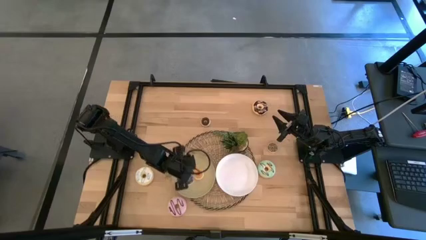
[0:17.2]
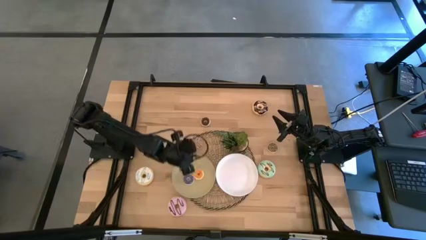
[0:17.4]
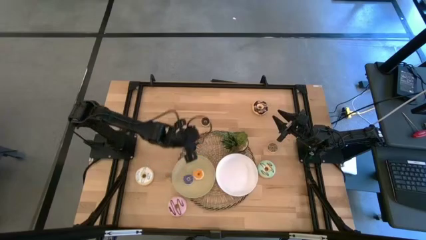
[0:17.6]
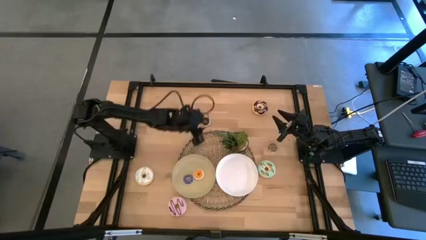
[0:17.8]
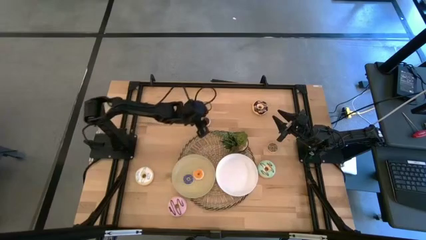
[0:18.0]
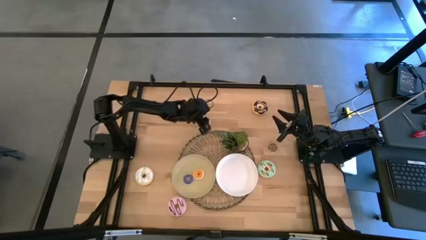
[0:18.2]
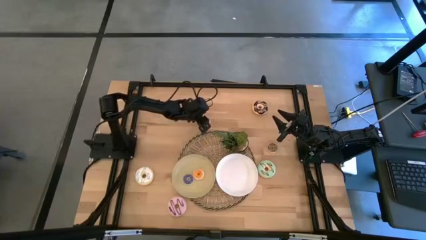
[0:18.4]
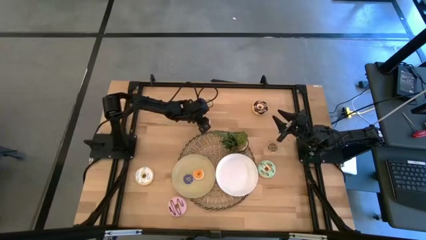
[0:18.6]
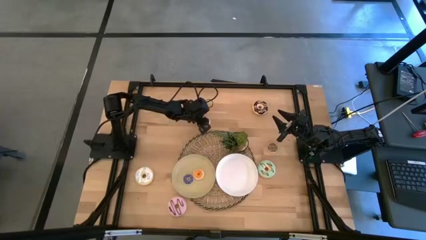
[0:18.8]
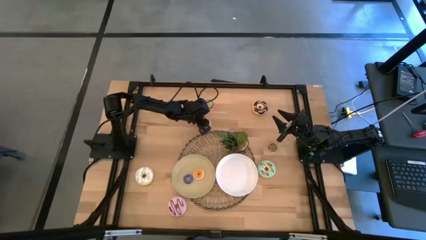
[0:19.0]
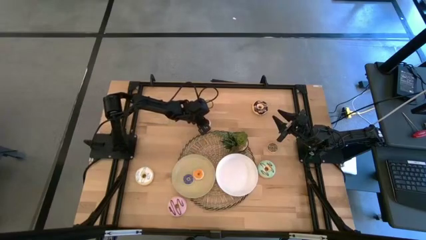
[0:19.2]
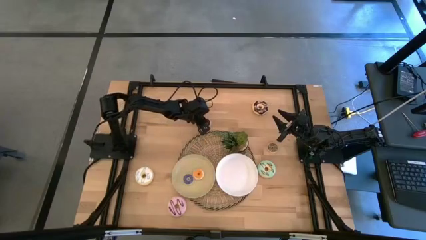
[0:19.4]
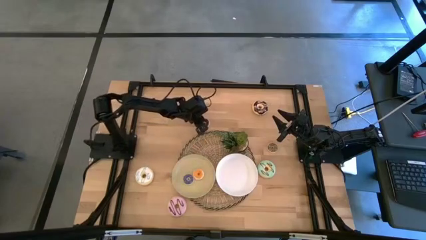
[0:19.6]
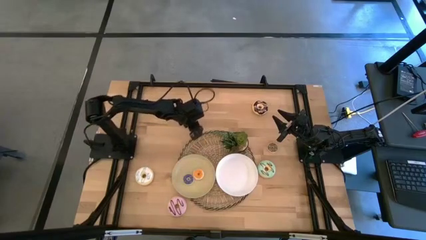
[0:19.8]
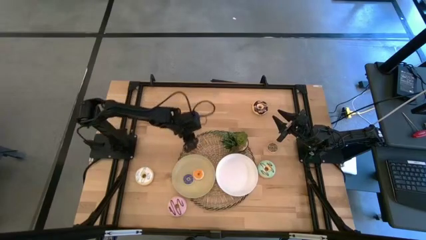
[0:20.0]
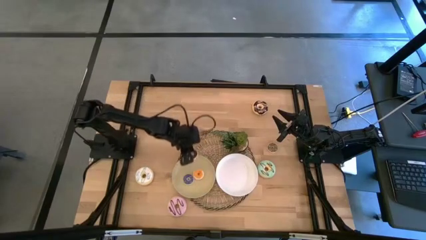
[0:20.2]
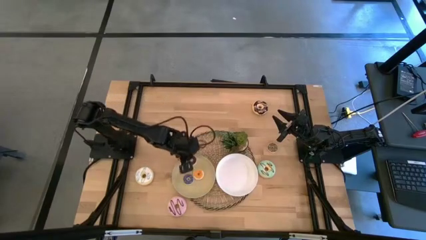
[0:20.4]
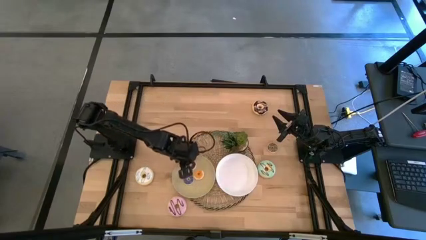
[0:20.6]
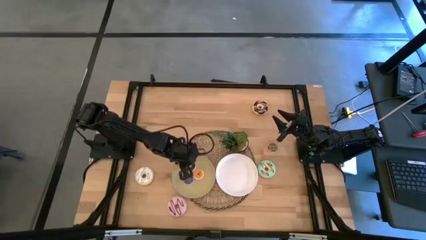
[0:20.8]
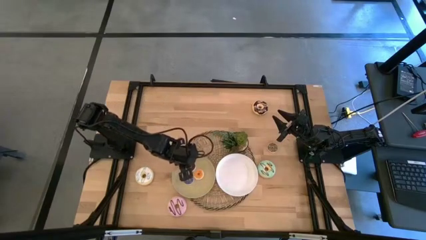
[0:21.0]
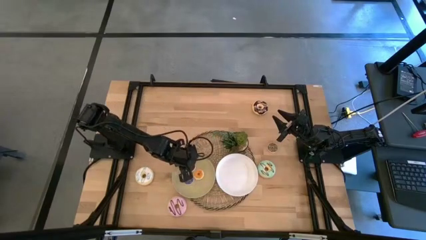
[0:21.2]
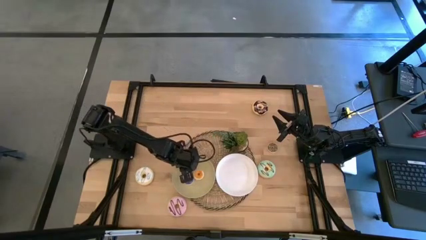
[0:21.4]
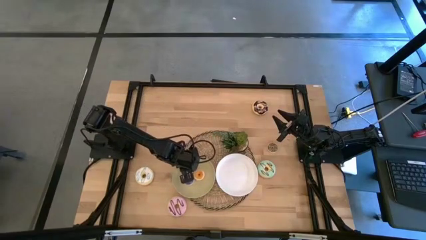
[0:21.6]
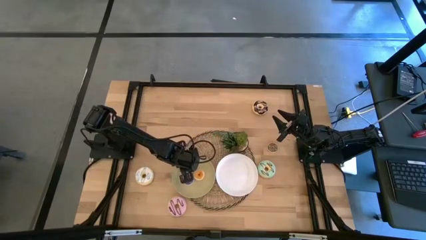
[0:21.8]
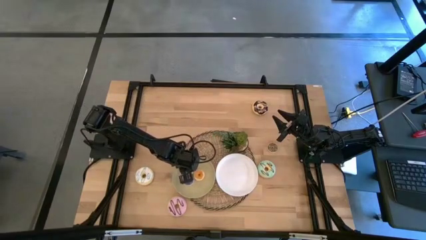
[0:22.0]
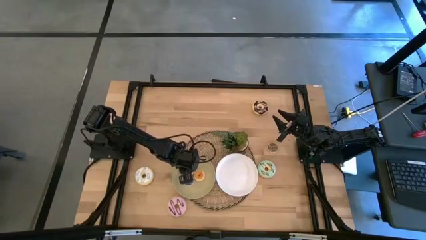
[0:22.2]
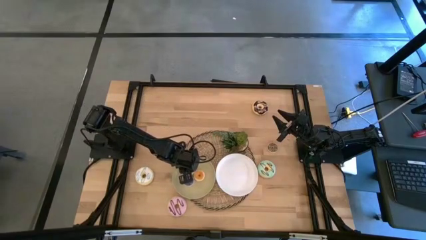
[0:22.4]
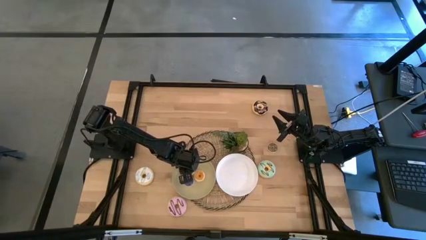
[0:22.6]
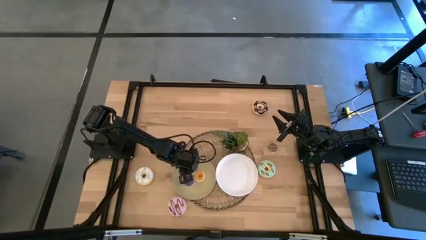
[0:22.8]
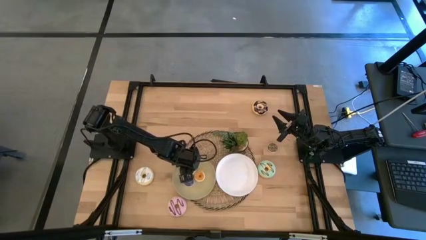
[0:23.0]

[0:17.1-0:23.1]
Task: Pick & Place donuts
Put the small black donut on the brown plate

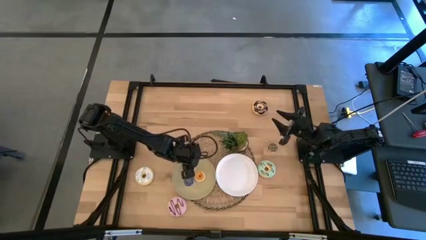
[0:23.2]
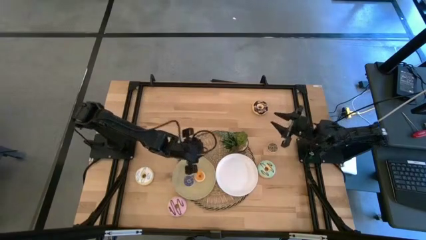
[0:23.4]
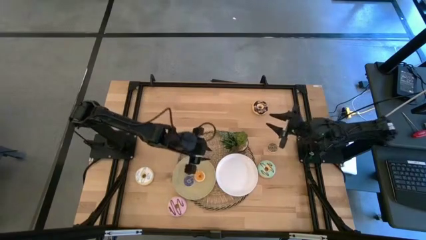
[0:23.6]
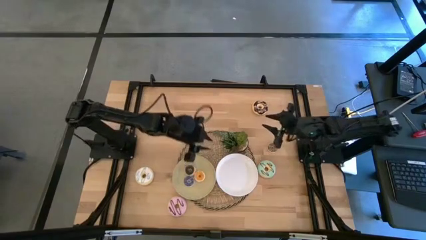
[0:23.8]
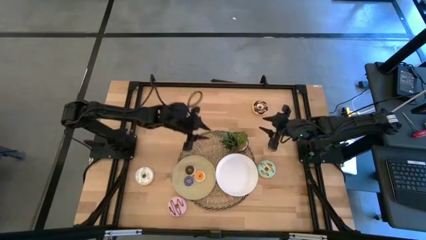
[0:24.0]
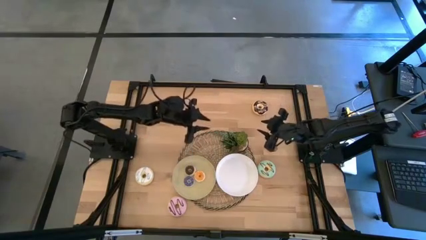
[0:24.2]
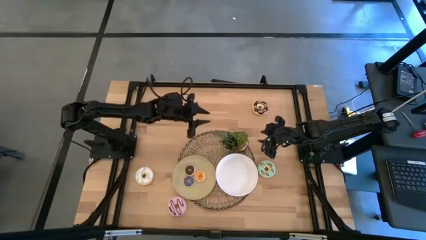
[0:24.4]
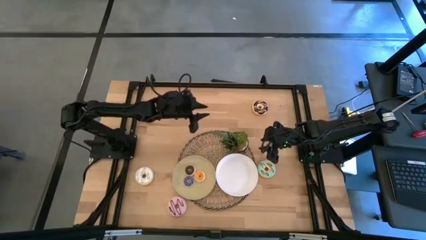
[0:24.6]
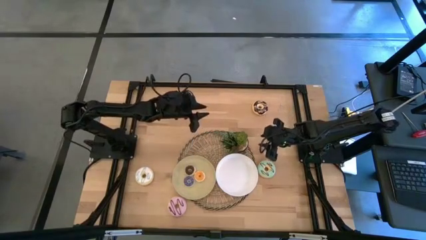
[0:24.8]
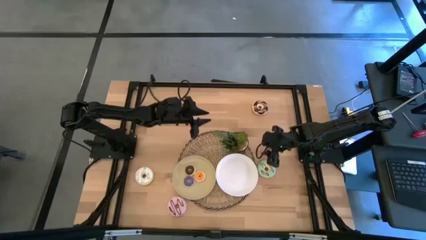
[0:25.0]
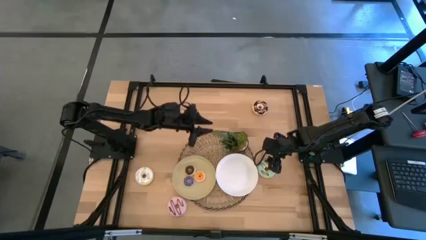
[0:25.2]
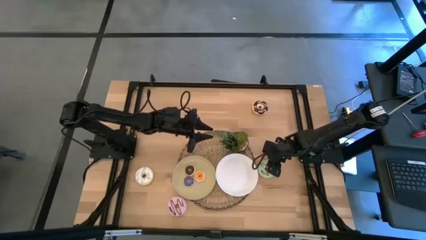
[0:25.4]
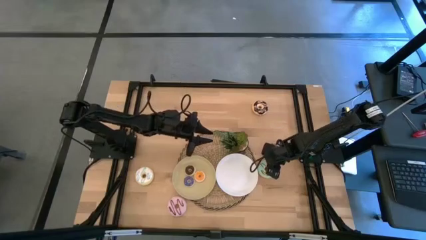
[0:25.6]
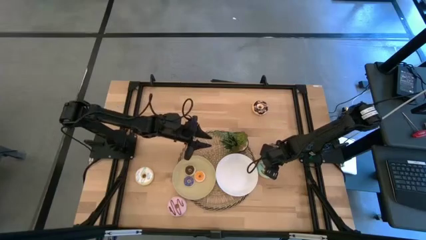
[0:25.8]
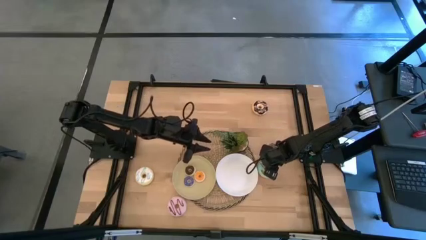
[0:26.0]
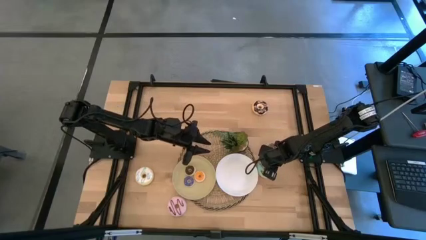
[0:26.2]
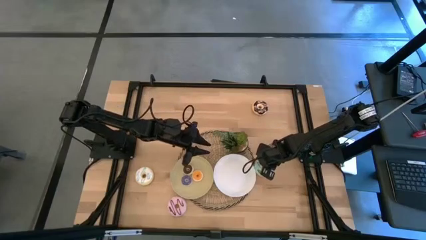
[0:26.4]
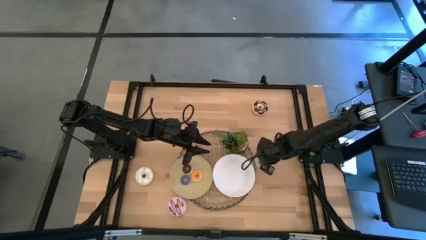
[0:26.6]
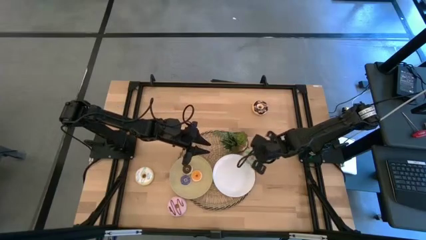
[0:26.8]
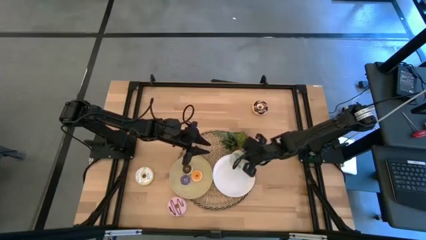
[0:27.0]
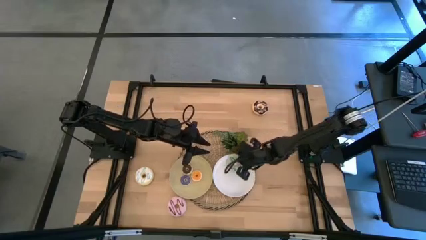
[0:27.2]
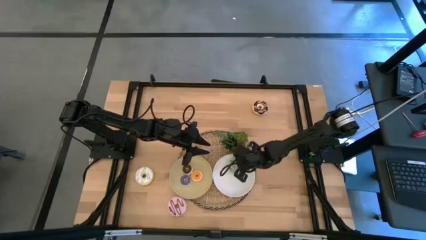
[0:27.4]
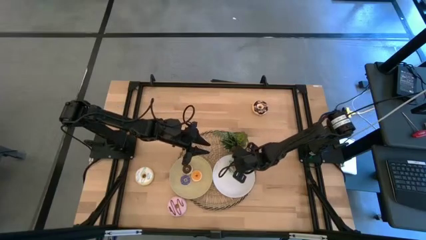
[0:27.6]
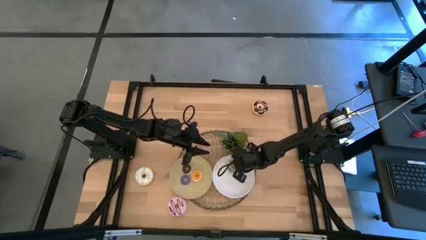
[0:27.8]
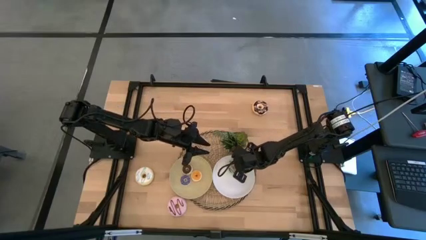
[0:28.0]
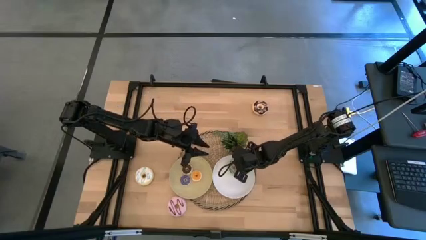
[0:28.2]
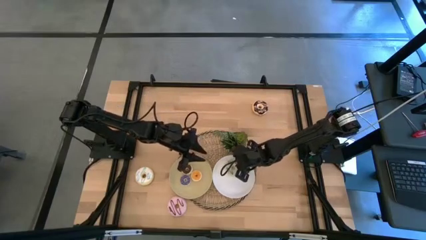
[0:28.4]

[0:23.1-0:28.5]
Put the large green donut on the white plate

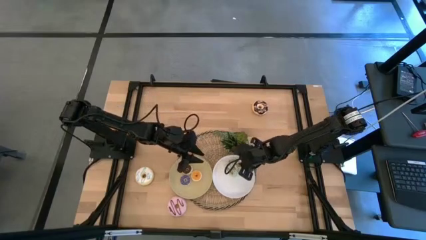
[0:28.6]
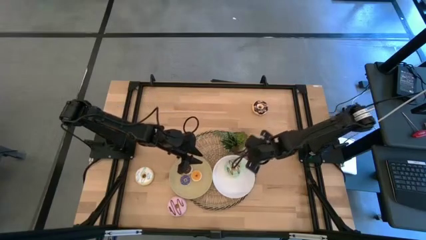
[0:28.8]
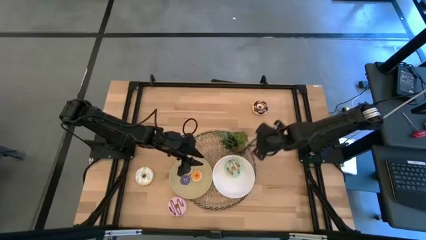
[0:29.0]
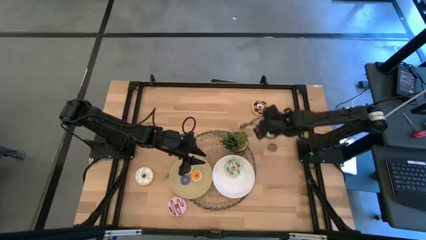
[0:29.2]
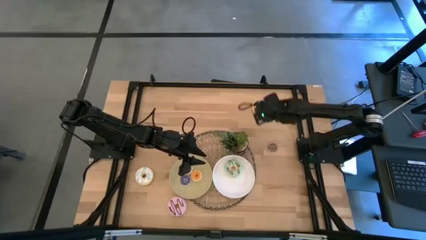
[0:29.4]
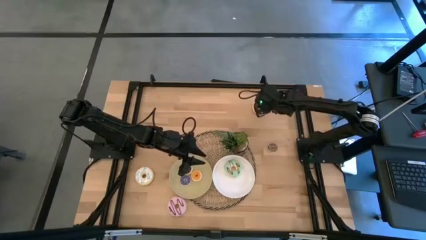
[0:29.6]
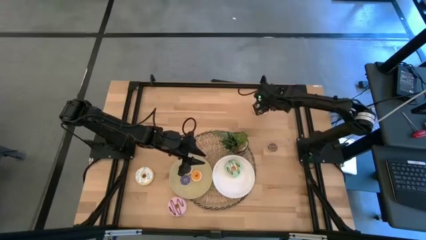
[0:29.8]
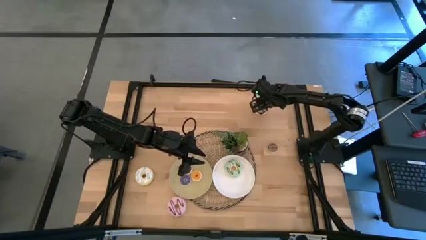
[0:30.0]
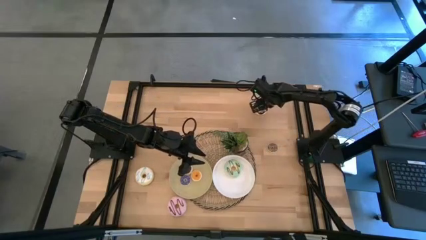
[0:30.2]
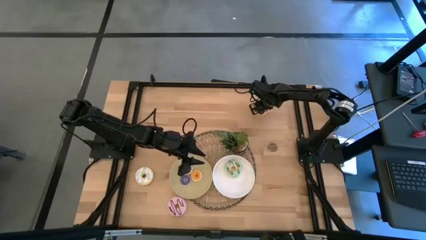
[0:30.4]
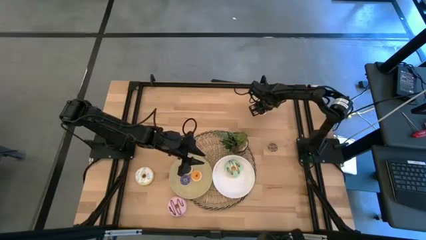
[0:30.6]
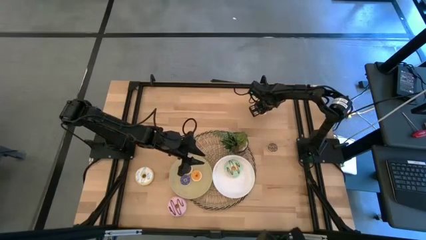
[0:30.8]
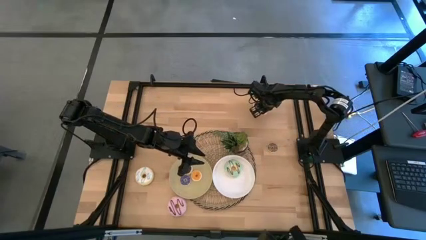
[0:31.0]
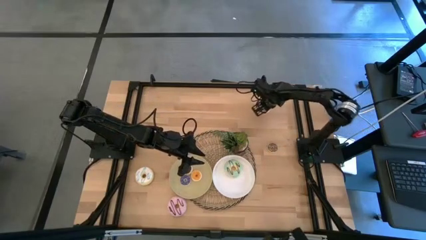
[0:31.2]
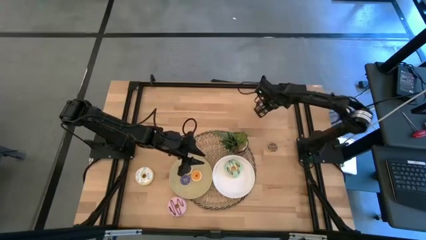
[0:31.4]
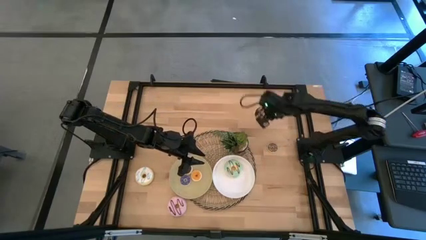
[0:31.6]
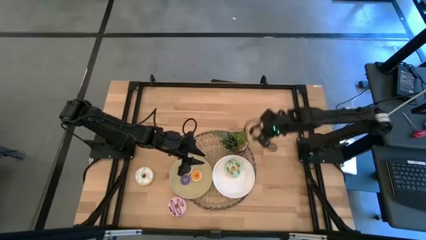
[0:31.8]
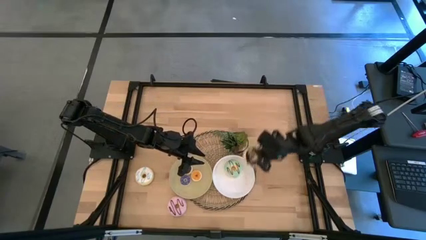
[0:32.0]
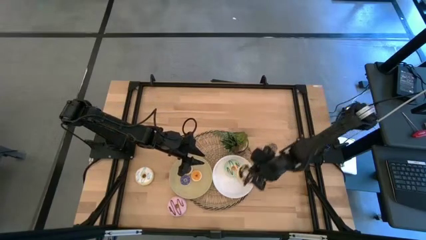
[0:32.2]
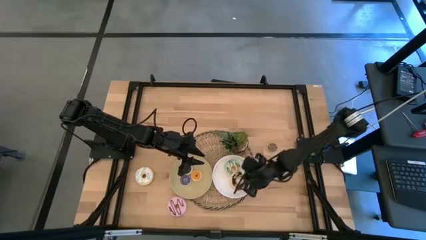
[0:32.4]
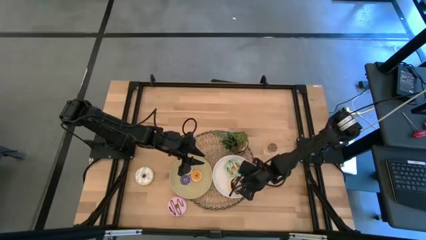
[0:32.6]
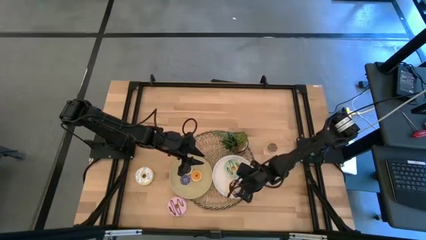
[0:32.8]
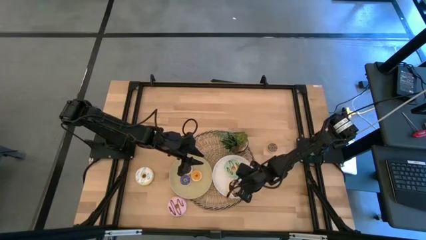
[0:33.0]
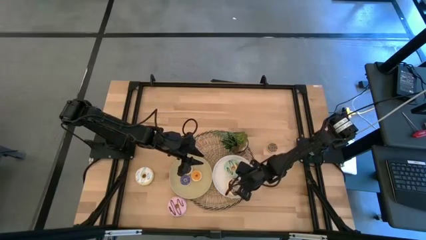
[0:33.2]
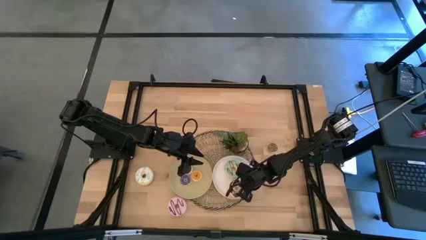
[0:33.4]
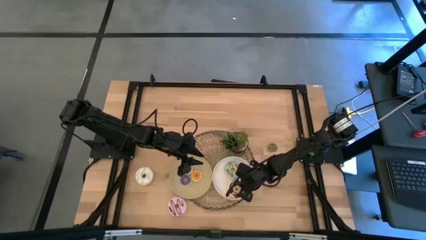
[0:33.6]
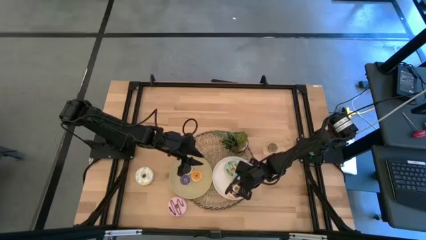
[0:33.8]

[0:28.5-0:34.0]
Put the large black donut on the white plate
